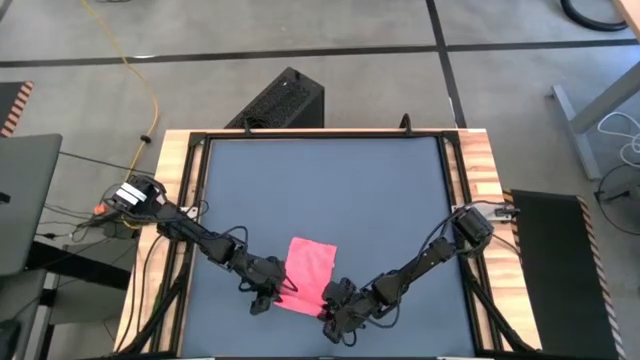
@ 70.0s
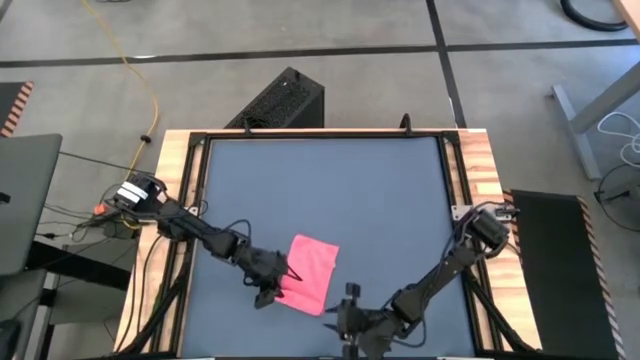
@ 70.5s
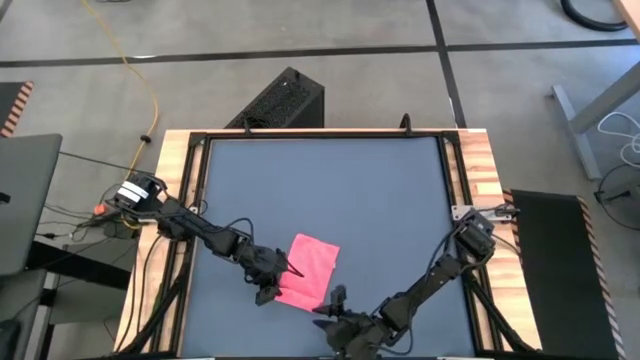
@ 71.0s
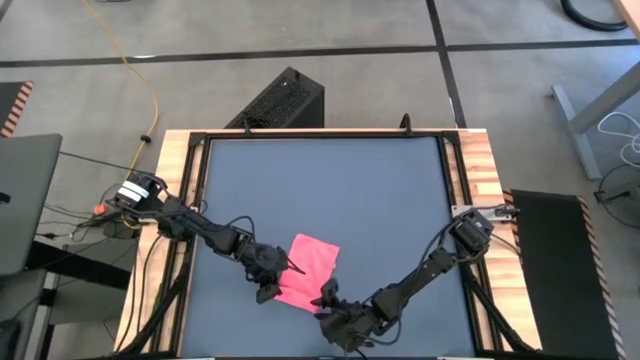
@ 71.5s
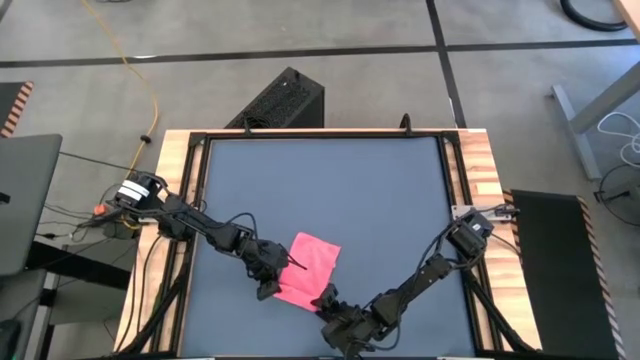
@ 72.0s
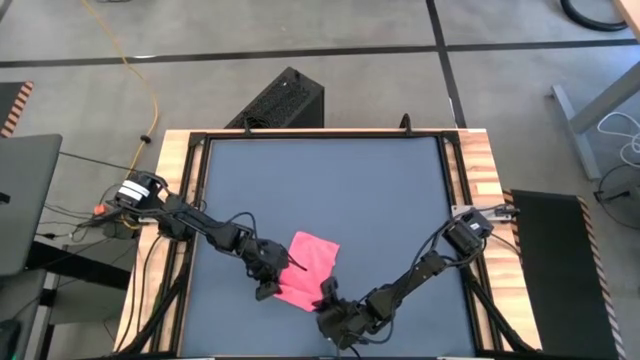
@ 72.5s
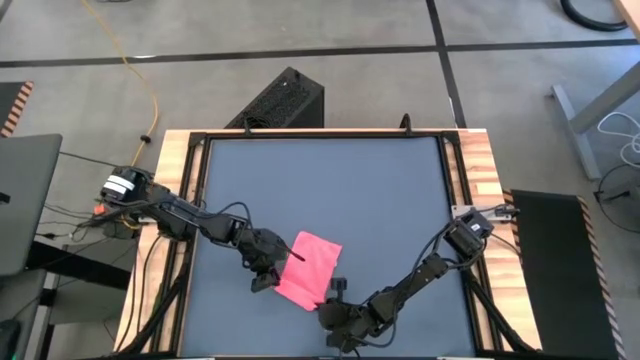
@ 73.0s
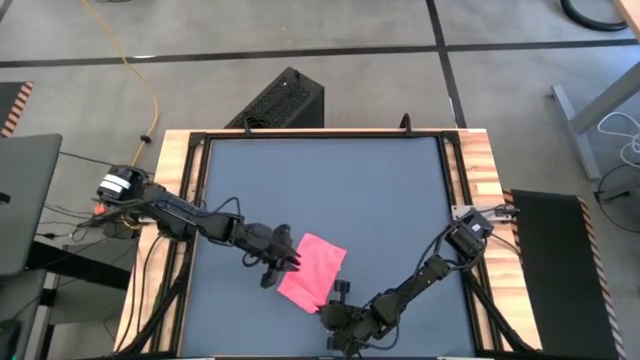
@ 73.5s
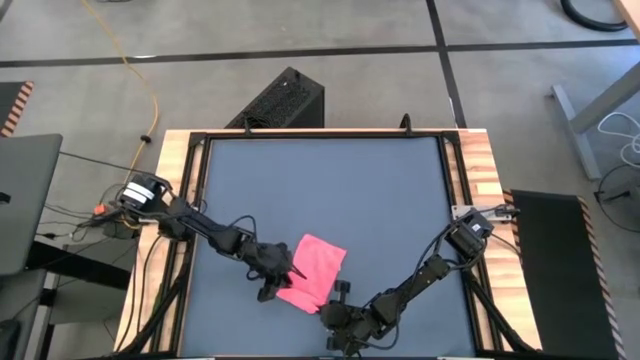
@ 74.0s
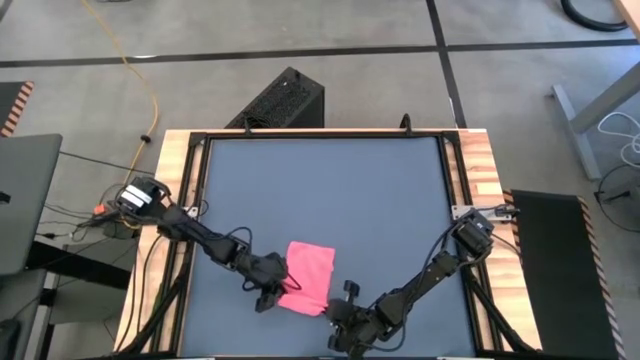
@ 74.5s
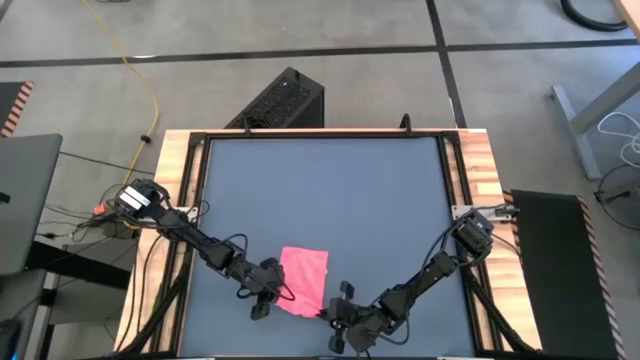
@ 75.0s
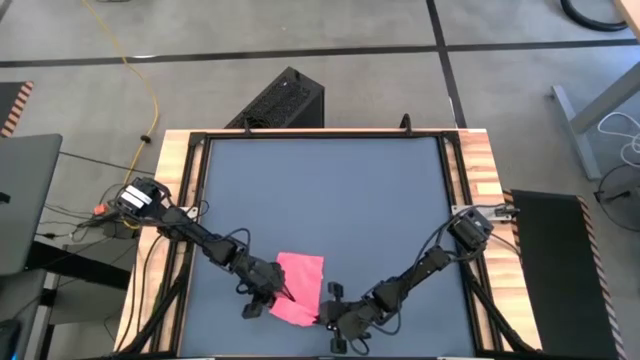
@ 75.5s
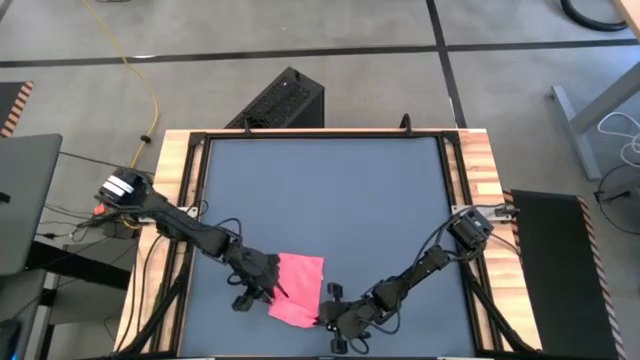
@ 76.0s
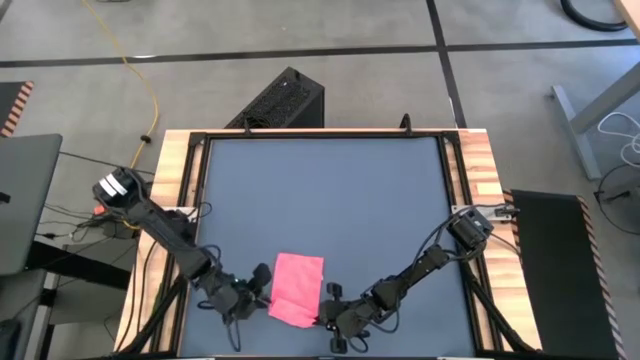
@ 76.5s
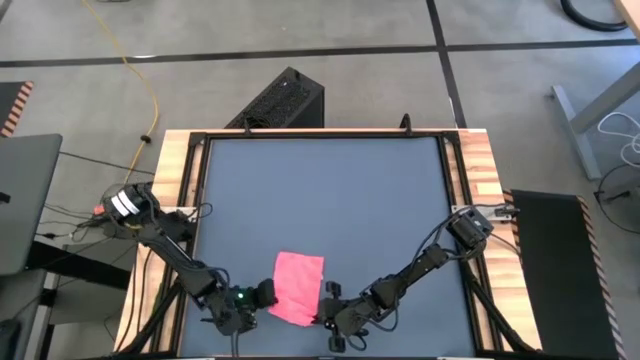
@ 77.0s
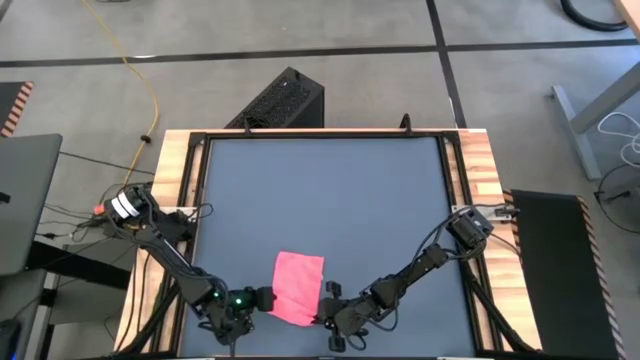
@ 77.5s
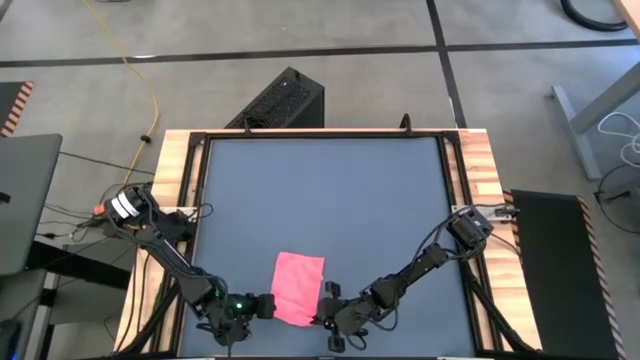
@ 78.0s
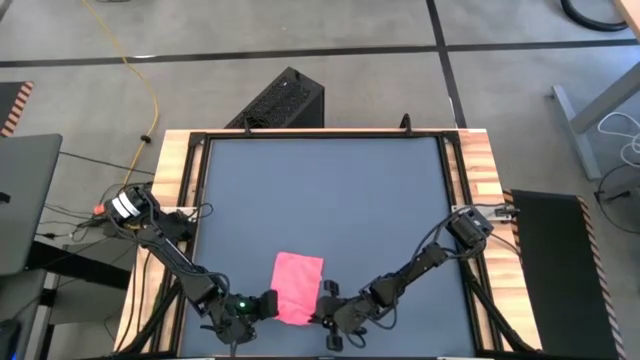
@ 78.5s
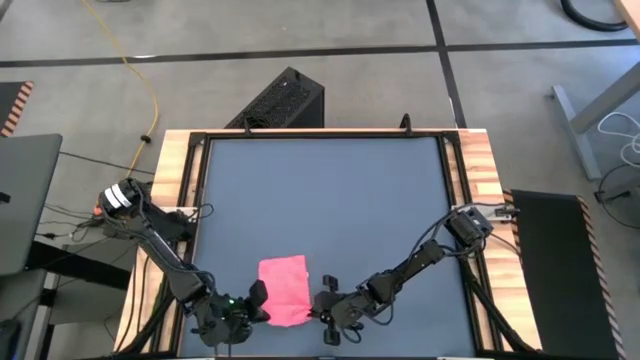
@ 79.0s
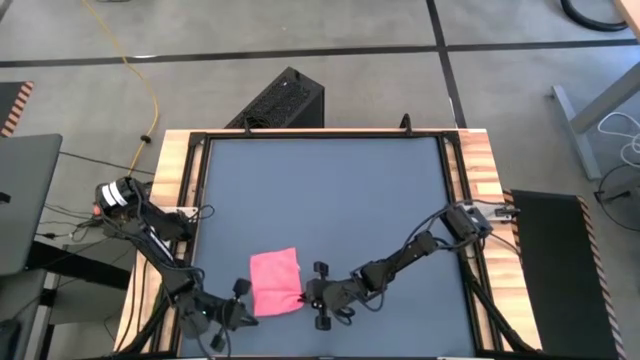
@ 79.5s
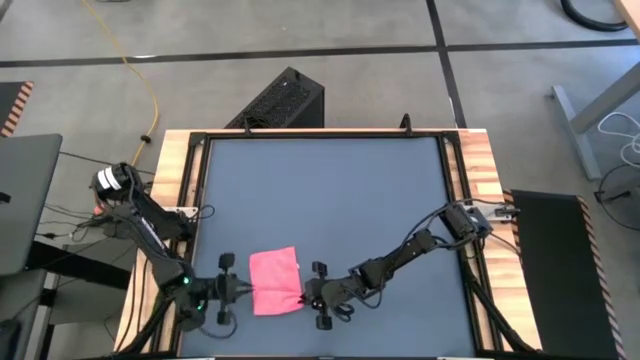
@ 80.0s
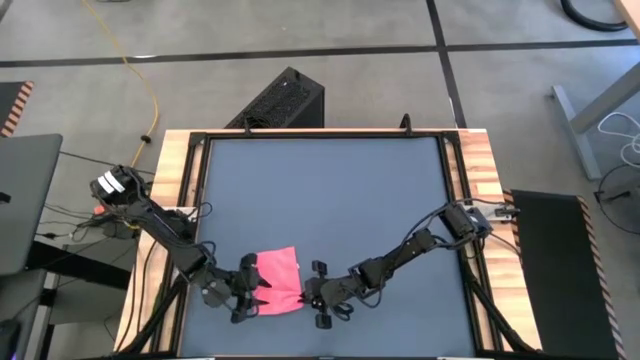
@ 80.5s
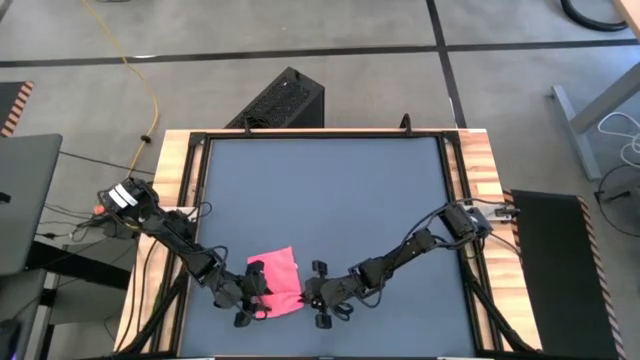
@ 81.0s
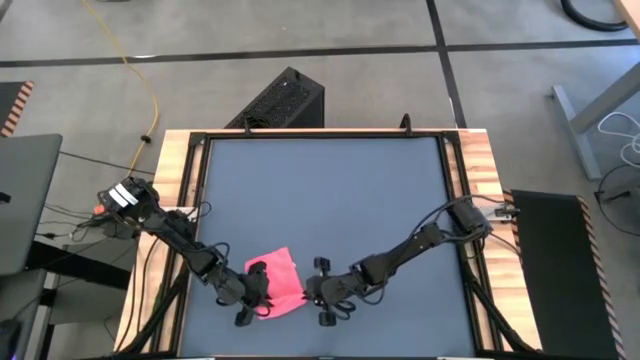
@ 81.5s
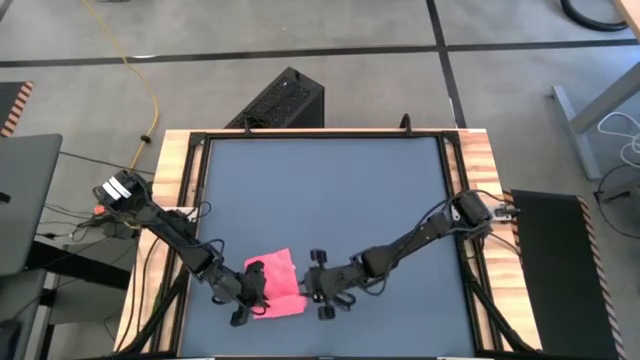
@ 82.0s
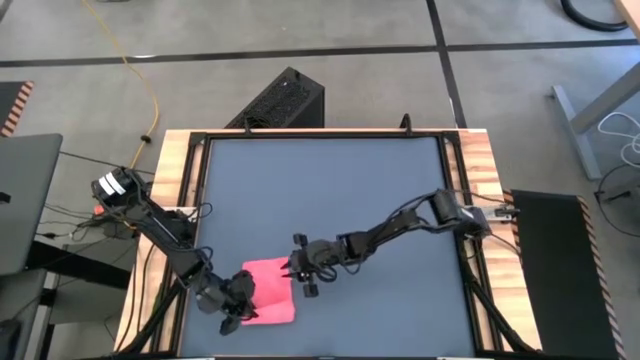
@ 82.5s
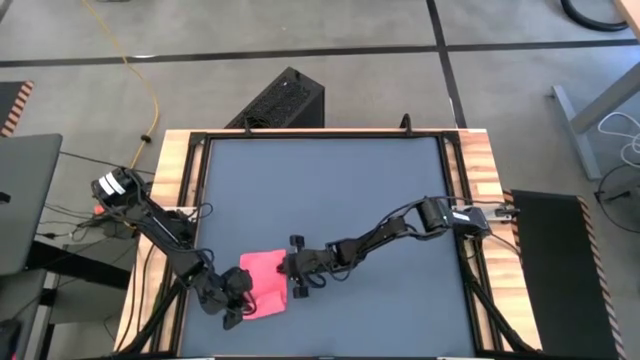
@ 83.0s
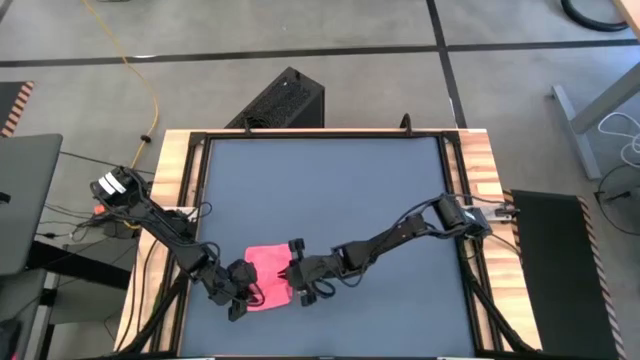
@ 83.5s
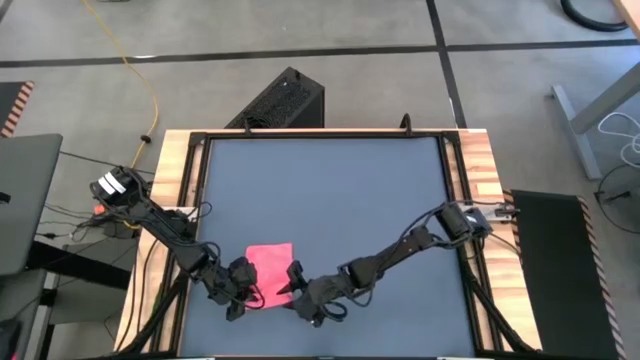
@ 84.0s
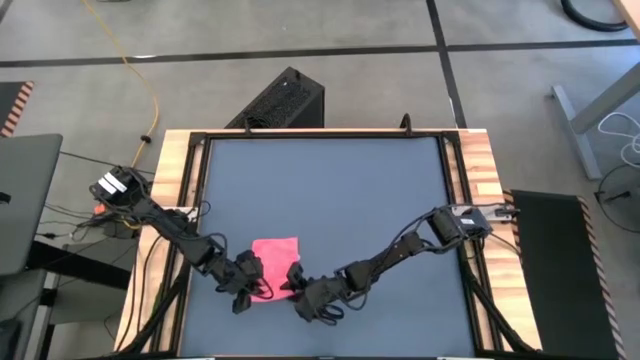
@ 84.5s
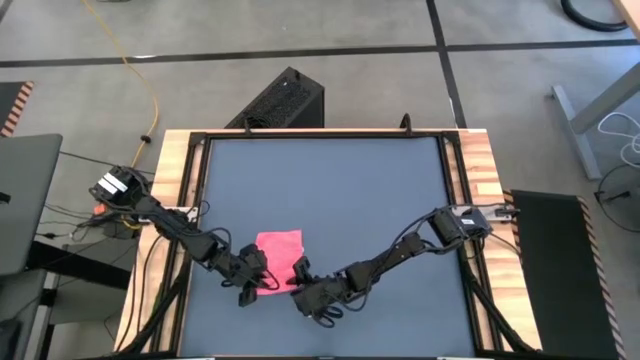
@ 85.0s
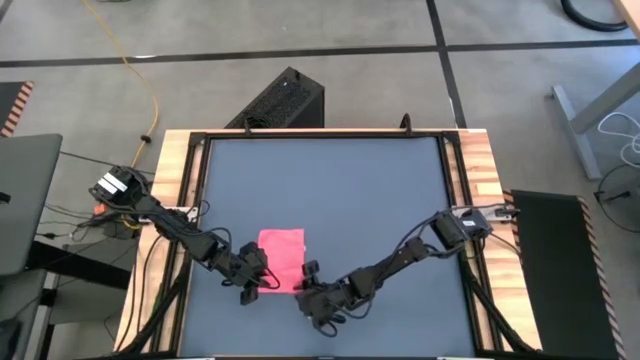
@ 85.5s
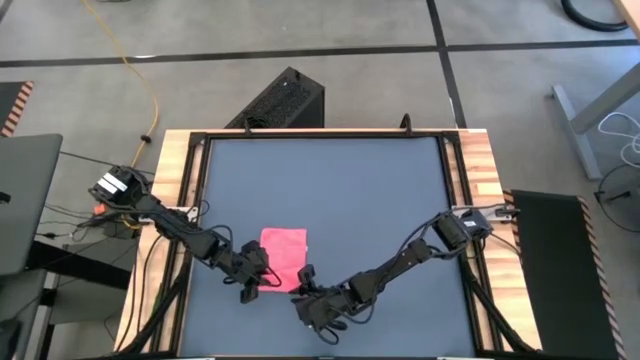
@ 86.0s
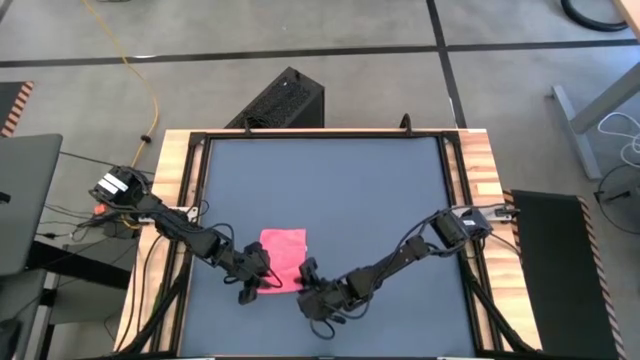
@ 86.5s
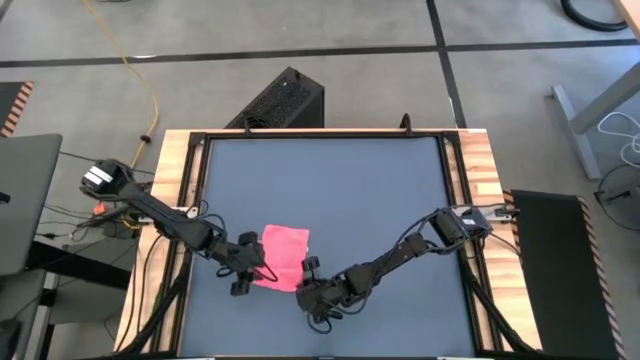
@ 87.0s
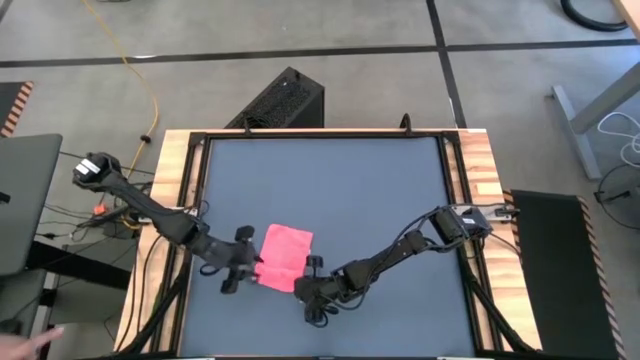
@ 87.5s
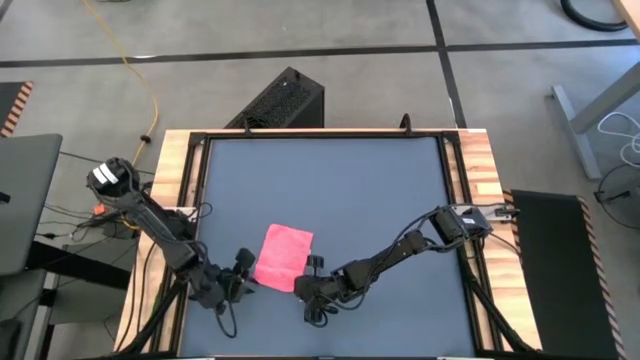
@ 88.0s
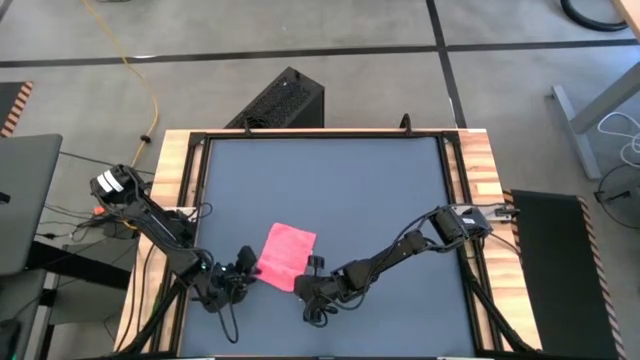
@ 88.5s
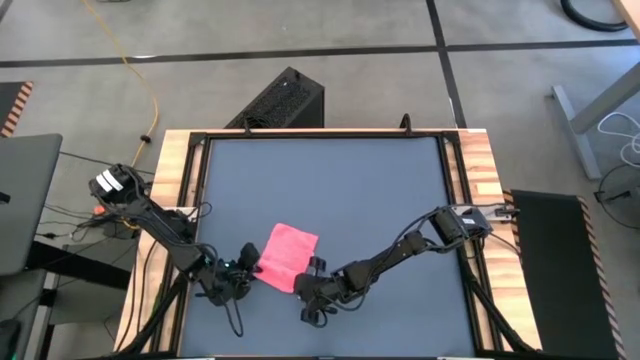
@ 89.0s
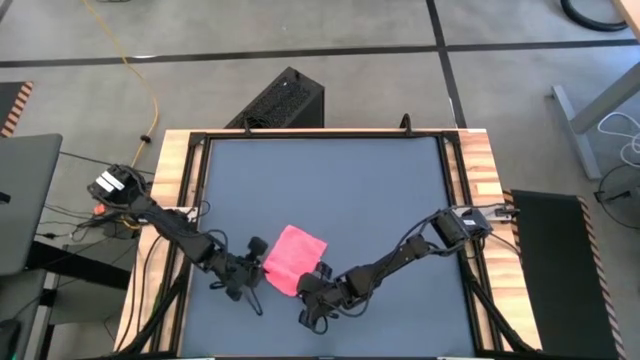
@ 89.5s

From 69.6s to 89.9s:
Task: Roll towel
Roll the pink microfiber towel
